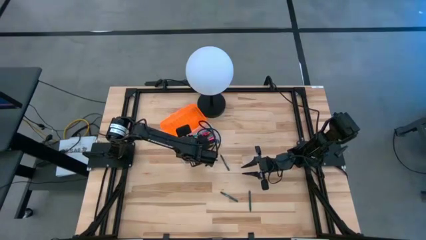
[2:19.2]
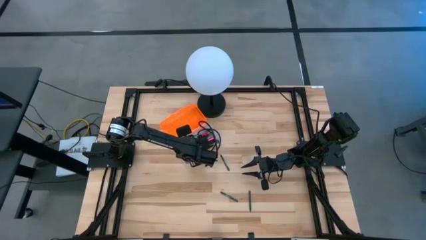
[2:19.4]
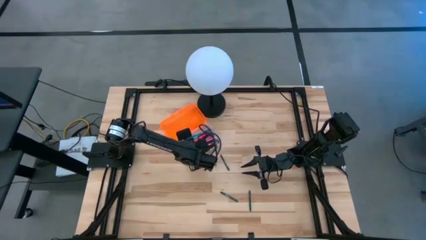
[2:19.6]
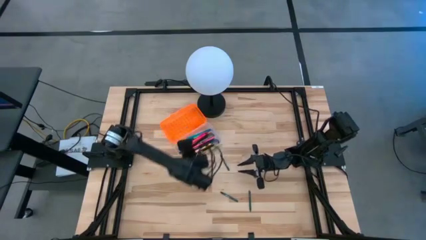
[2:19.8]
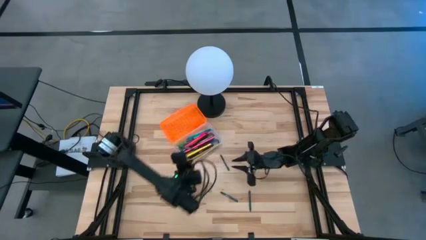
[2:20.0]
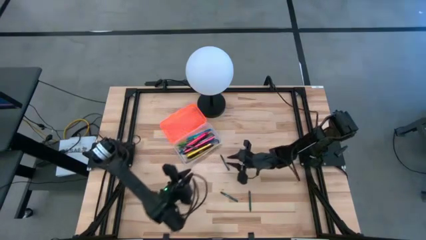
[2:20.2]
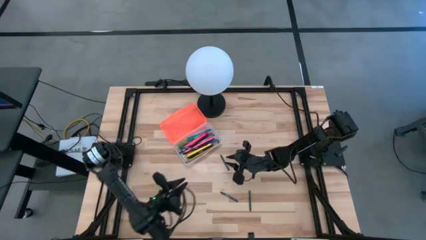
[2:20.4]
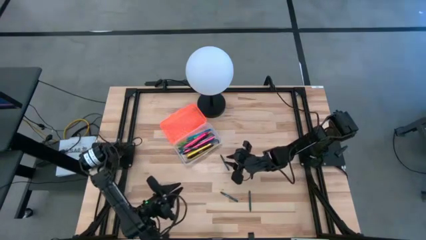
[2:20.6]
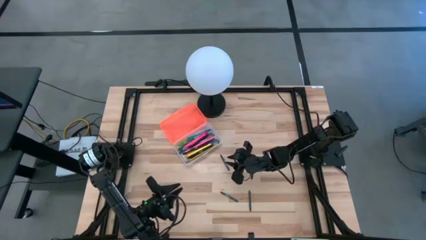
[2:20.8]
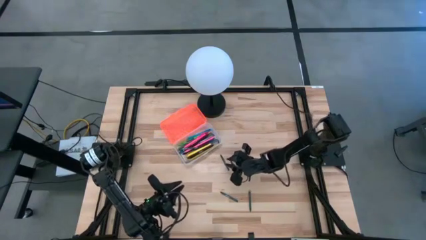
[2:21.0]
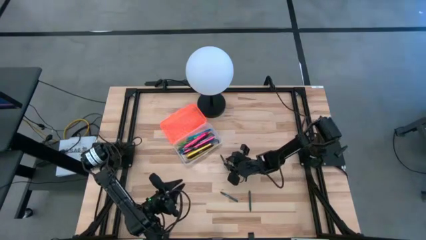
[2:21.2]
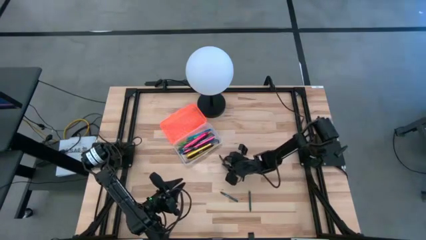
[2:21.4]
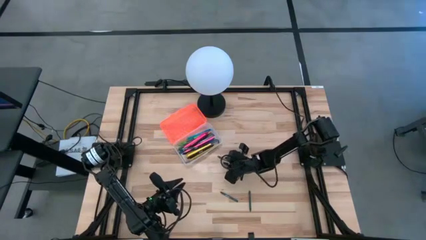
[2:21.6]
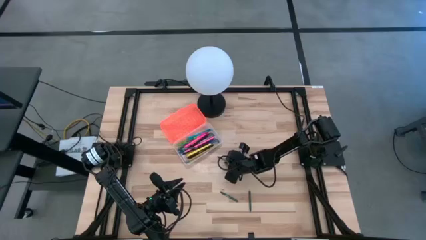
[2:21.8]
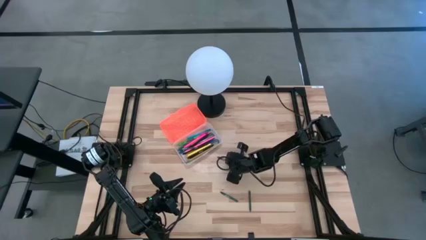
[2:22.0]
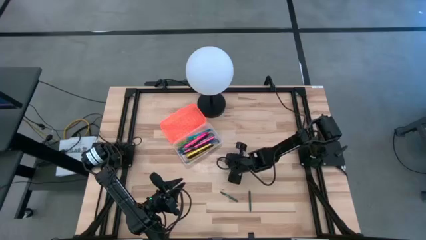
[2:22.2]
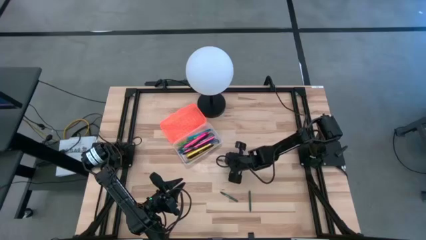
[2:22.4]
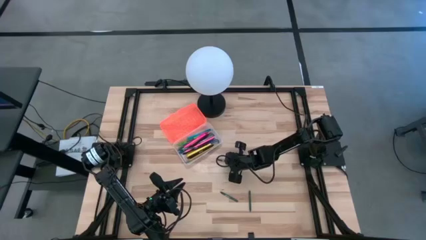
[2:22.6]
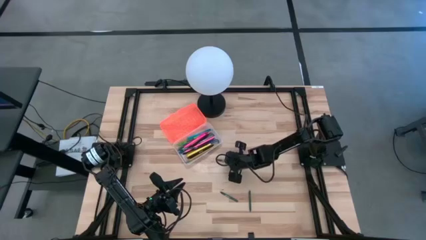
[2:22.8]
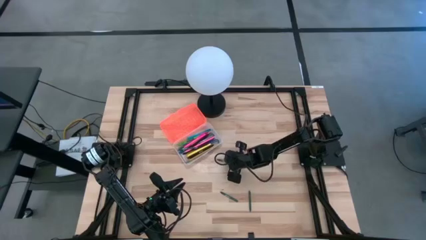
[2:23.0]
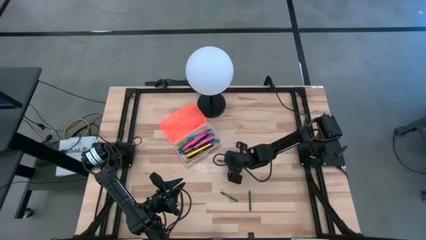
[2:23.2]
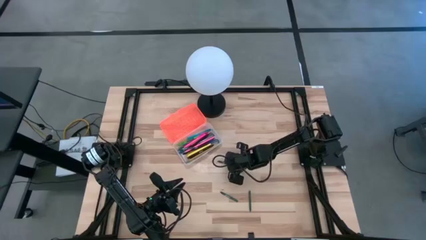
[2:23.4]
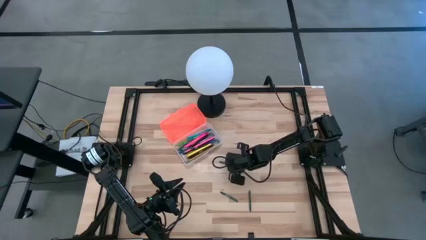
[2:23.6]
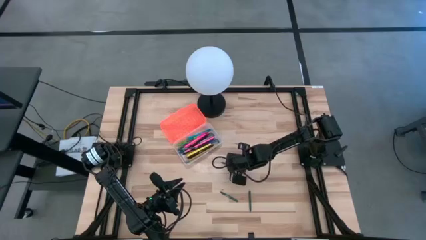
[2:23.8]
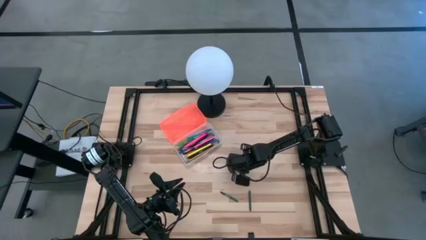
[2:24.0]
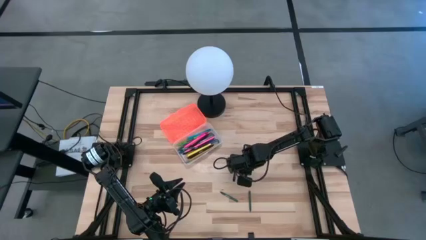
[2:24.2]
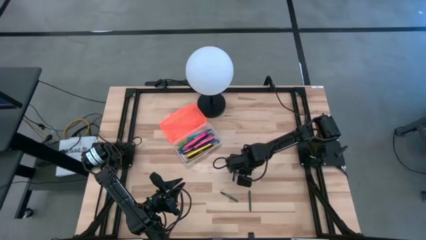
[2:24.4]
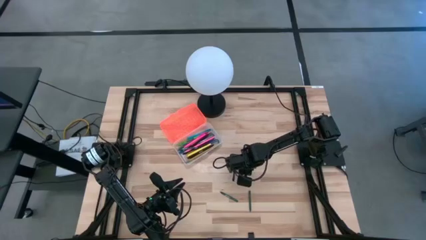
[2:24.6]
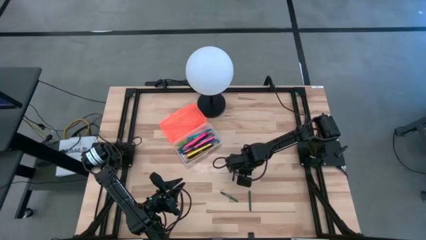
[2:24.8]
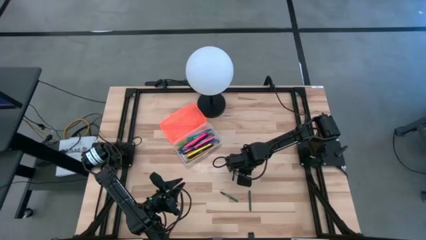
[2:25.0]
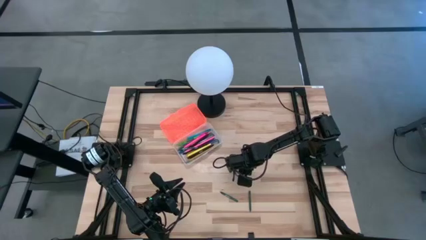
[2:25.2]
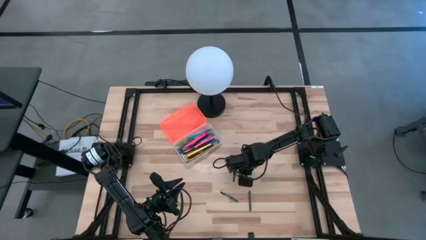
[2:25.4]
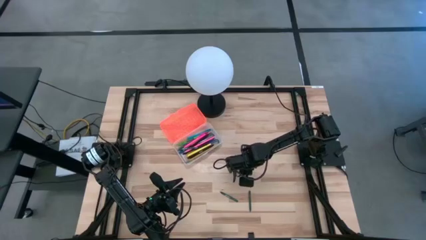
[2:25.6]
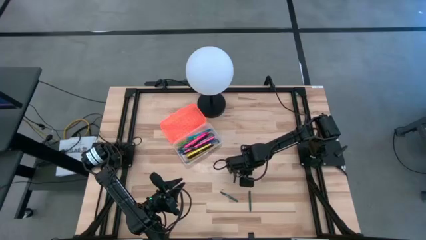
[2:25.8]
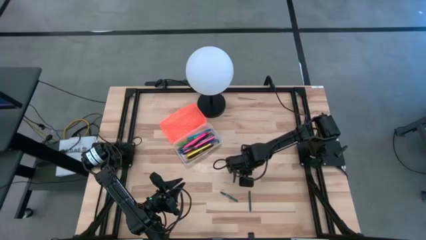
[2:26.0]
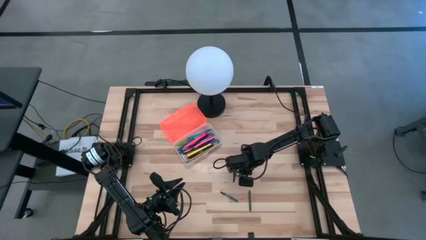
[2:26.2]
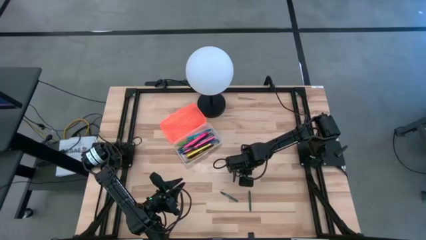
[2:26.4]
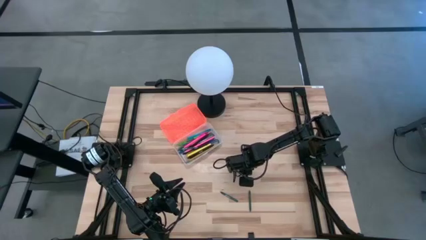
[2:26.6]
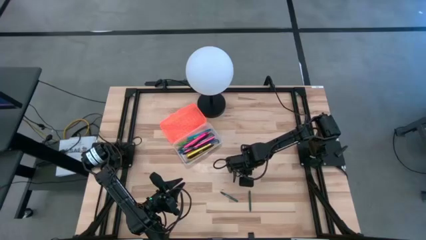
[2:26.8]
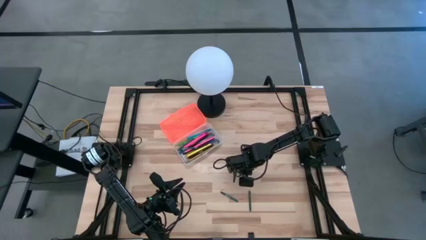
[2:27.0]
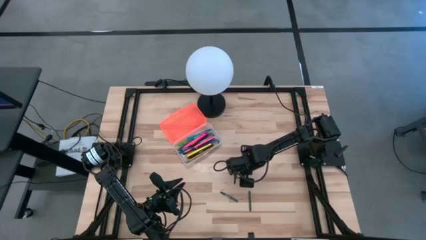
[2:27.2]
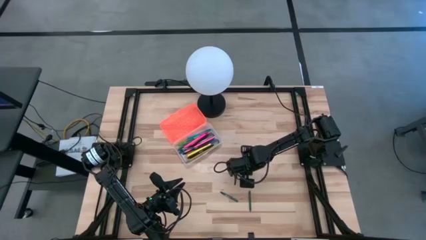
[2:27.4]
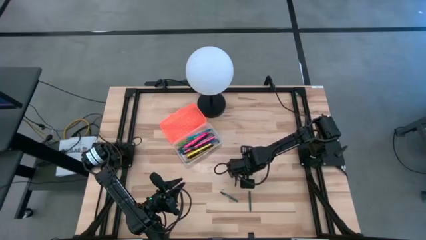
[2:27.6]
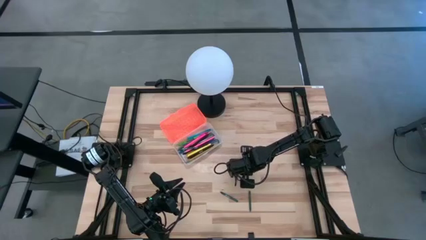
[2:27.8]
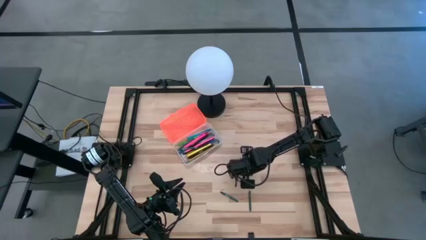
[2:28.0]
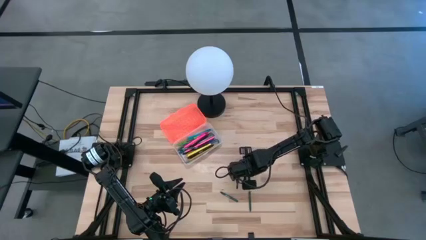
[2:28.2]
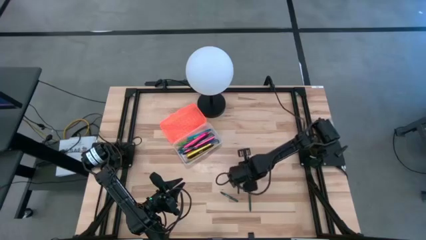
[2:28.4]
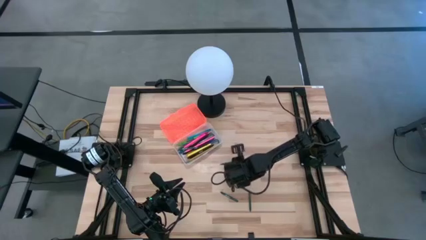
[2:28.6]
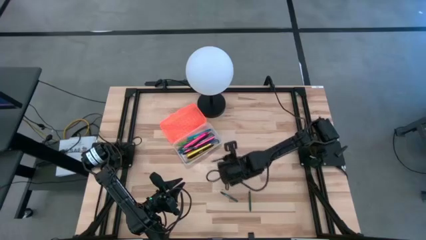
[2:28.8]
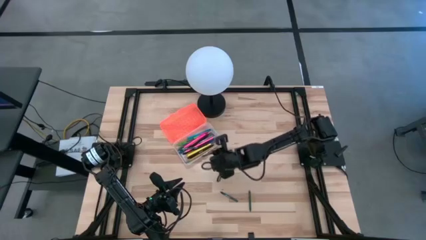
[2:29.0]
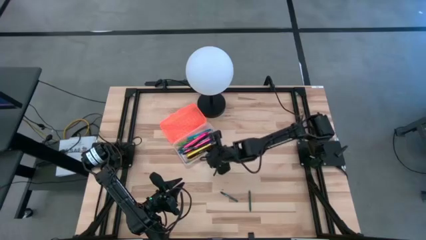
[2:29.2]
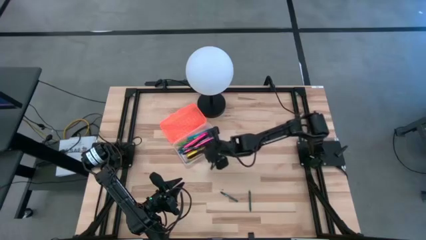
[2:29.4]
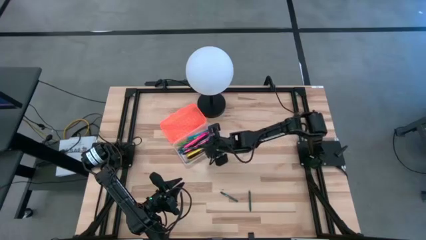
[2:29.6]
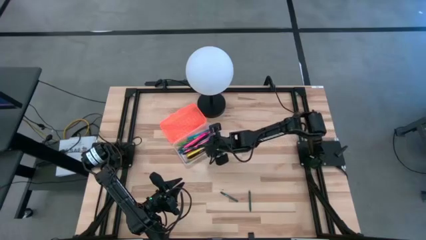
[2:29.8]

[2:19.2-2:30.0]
Task: Pick & place school supplies into a supply box
Put the top left green crayon into the orange supply box

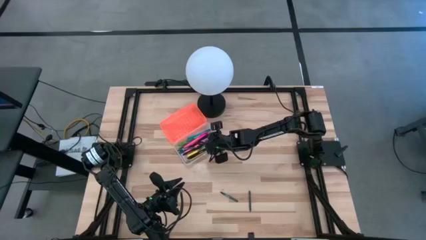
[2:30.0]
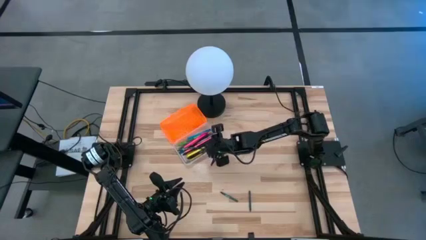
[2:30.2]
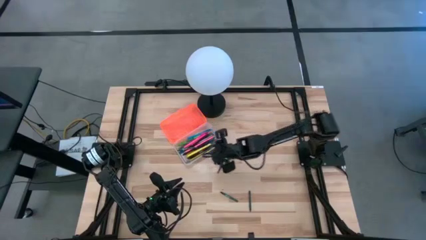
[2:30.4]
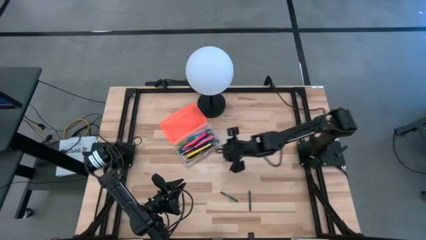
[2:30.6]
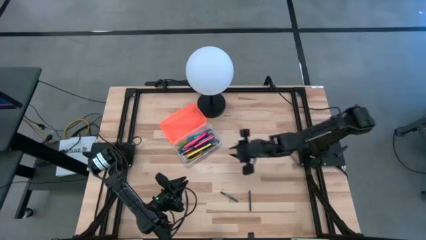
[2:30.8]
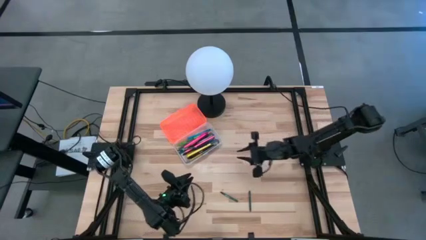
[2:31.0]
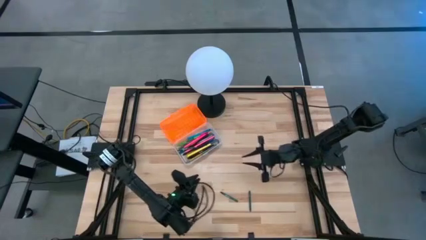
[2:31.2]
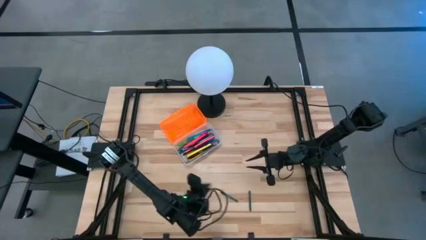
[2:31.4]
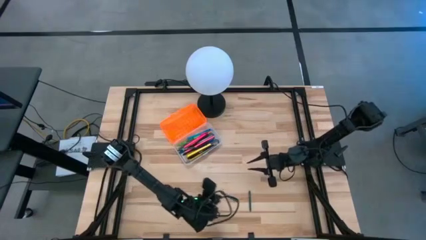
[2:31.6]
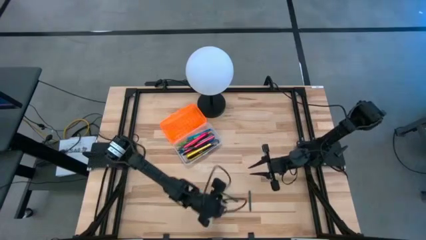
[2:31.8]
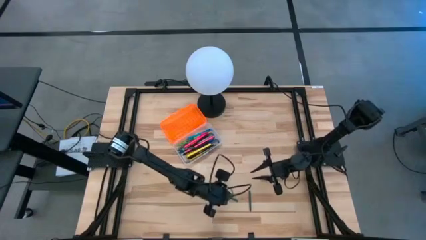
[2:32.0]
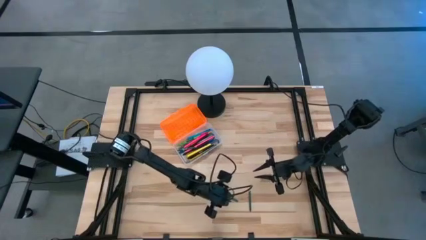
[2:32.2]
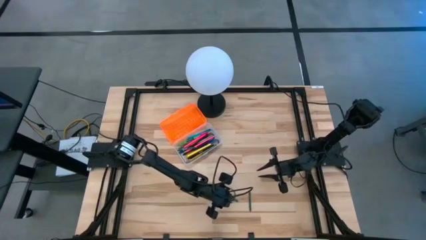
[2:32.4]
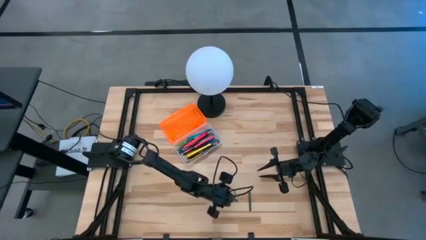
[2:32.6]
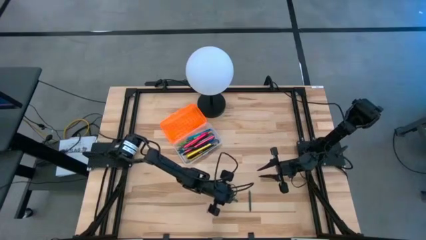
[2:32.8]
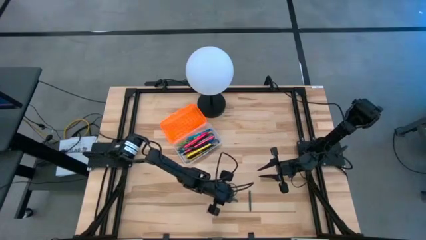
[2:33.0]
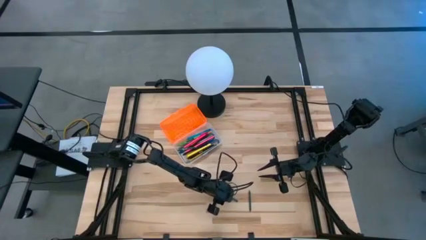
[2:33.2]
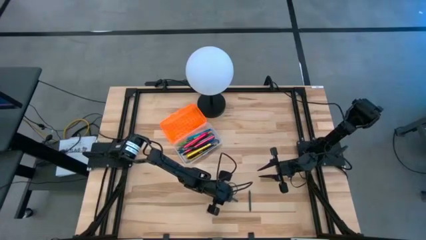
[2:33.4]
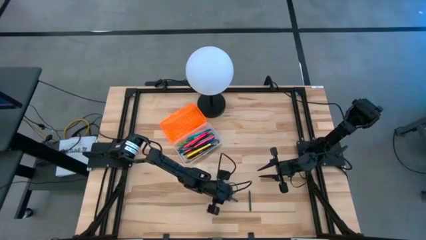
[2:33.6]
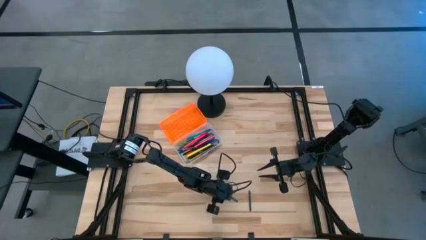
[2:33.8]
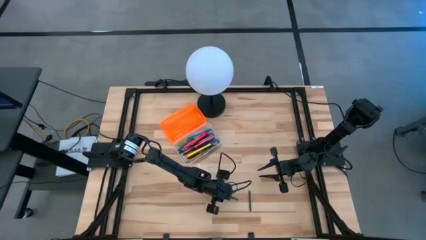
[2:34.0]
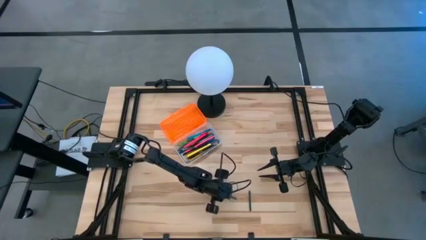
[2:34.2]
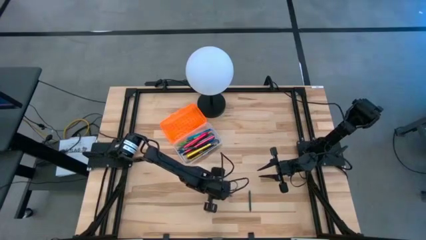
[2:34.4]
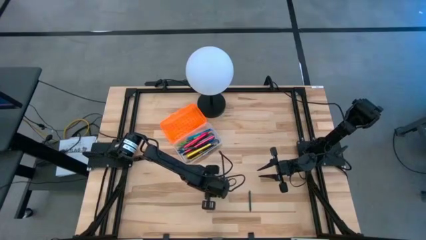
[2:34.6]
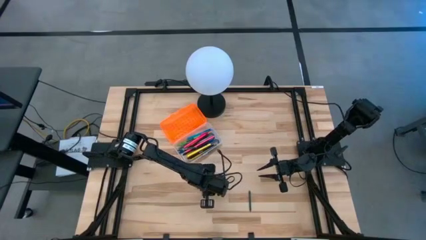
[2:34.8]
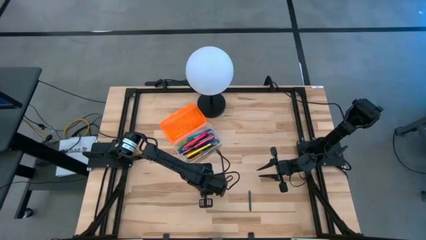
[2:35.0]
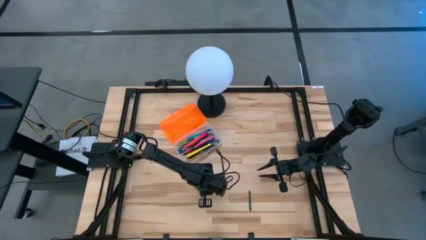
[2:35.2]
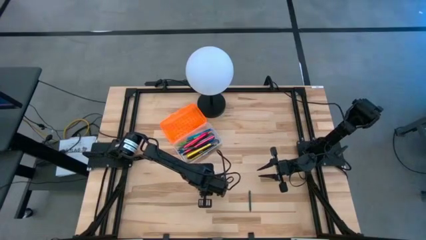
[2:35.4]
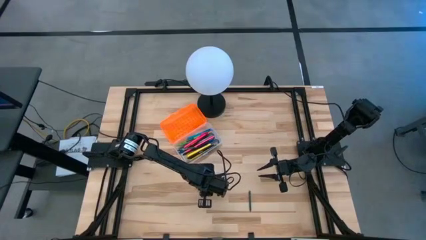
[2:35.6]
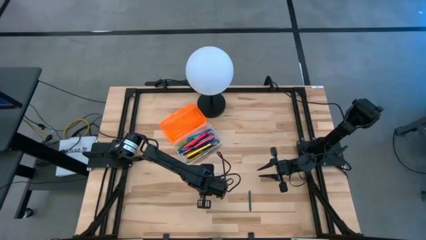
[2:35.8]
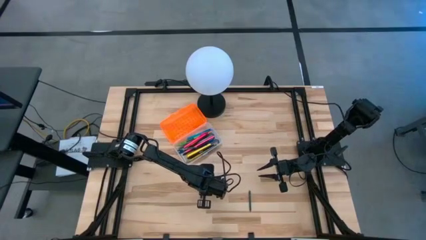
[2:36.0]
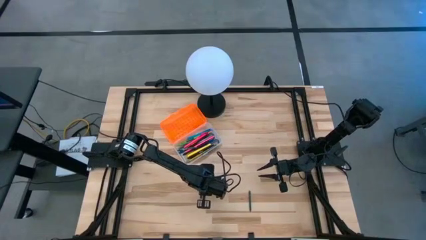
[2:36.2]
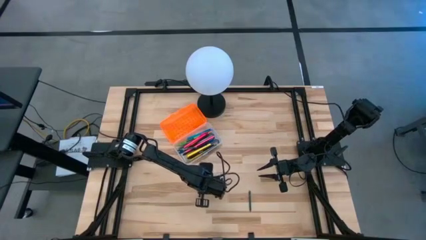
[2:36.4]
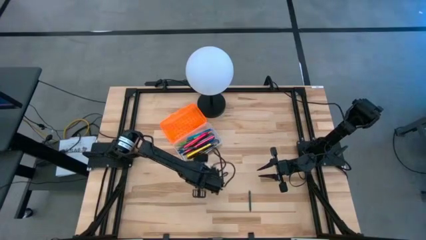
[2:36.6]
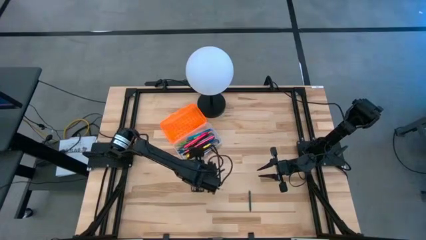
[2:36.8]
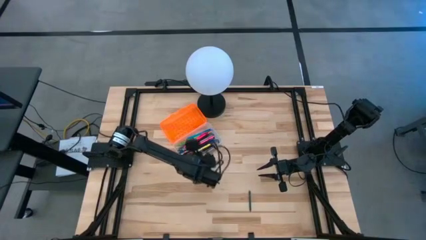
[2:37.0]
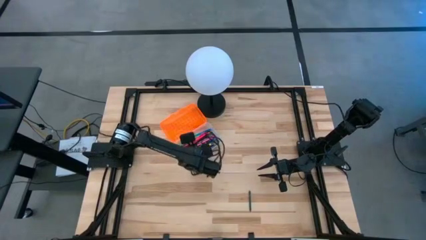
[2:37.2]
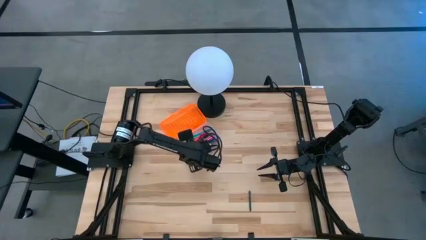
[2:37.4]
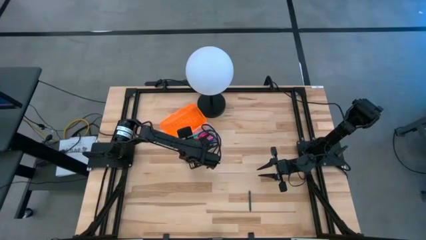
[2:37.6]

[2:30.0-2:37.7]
Put the left green crayon into the orange supply box
